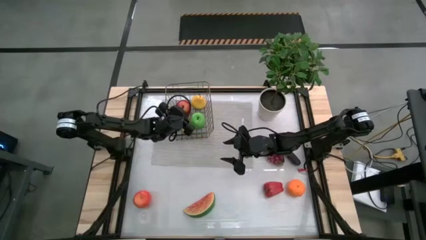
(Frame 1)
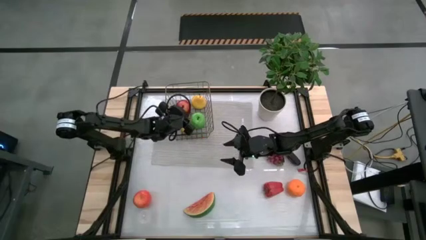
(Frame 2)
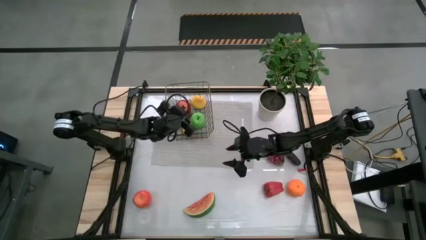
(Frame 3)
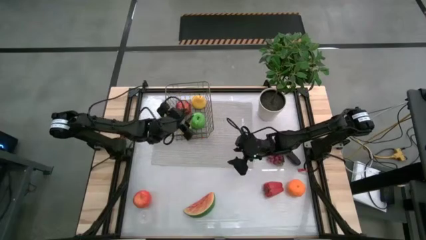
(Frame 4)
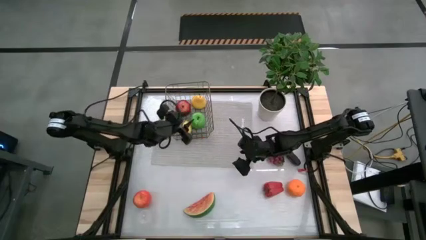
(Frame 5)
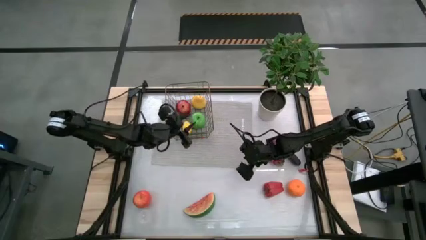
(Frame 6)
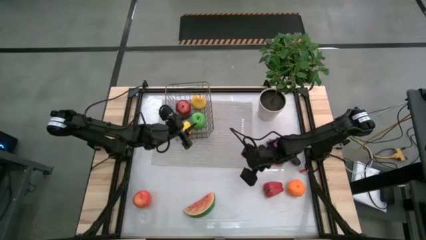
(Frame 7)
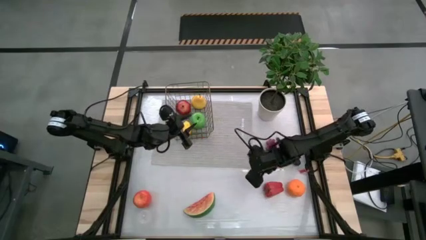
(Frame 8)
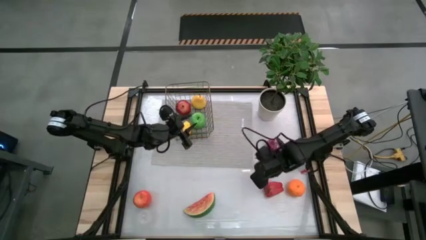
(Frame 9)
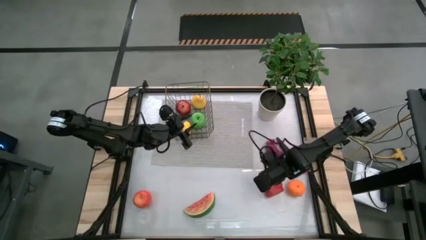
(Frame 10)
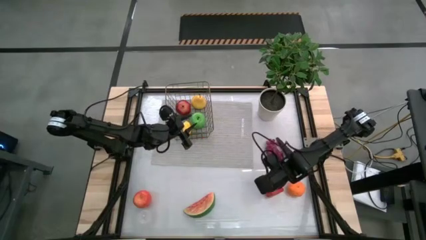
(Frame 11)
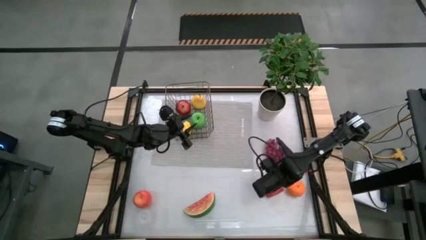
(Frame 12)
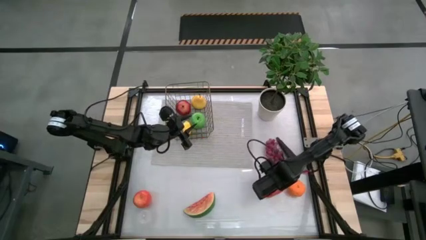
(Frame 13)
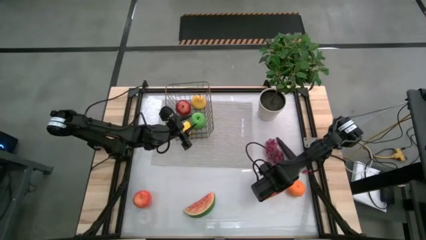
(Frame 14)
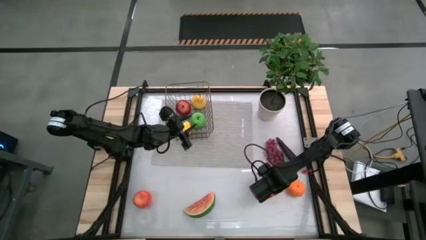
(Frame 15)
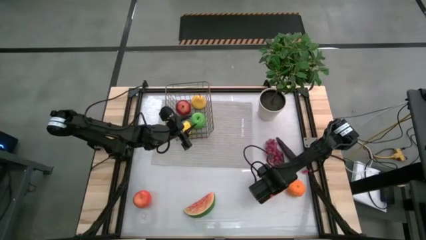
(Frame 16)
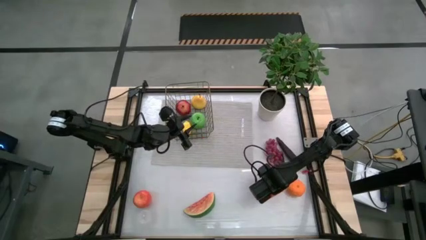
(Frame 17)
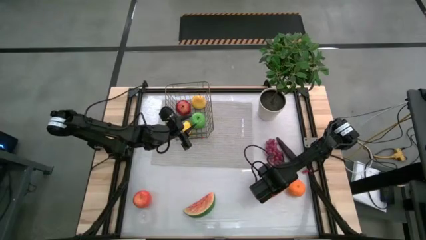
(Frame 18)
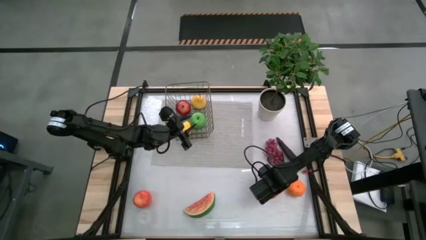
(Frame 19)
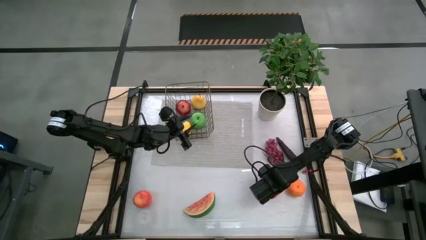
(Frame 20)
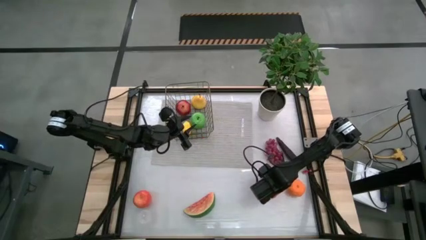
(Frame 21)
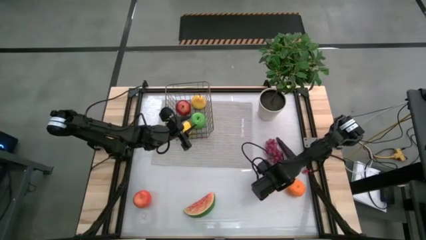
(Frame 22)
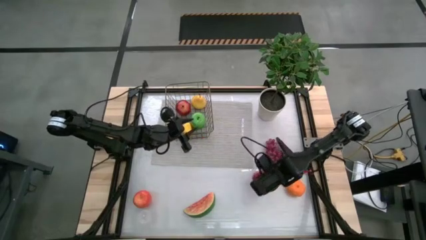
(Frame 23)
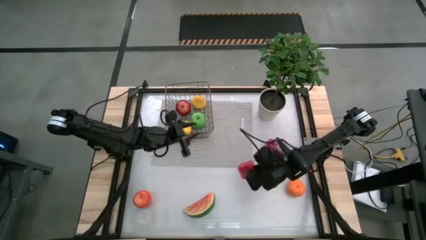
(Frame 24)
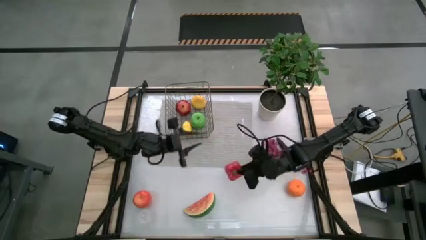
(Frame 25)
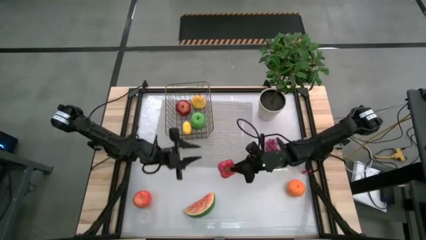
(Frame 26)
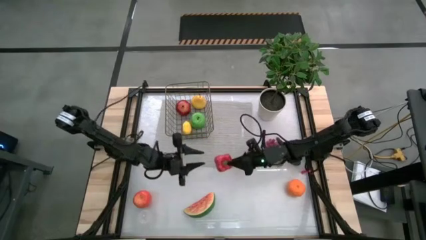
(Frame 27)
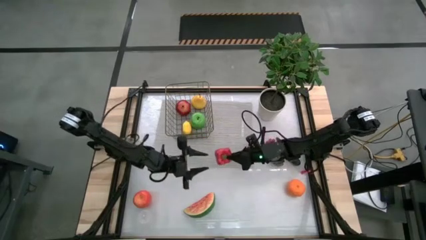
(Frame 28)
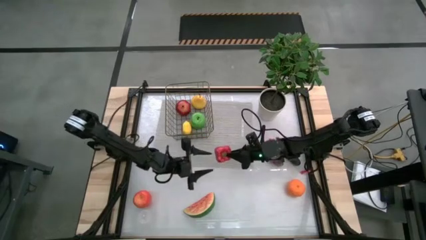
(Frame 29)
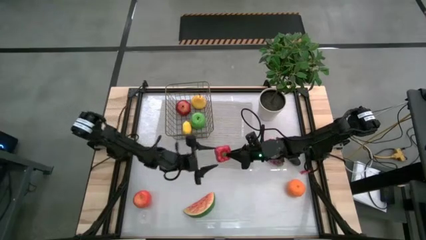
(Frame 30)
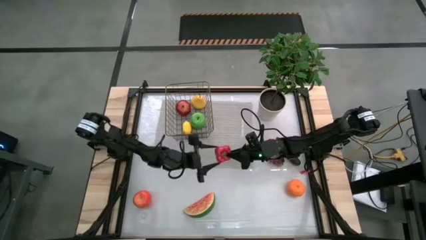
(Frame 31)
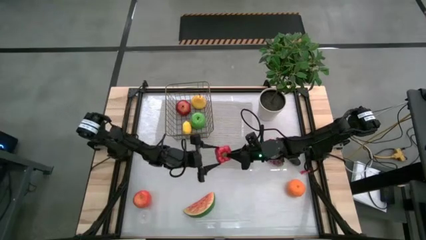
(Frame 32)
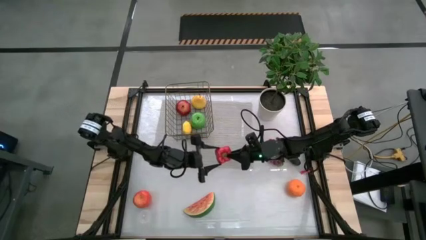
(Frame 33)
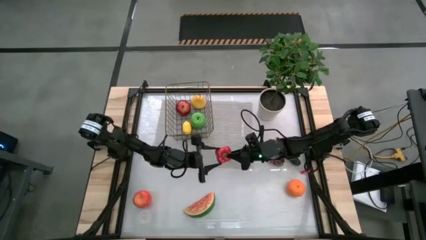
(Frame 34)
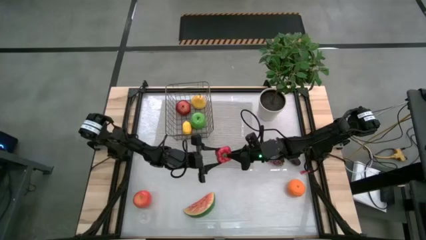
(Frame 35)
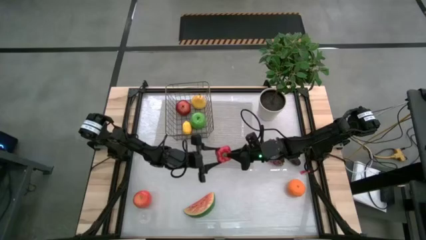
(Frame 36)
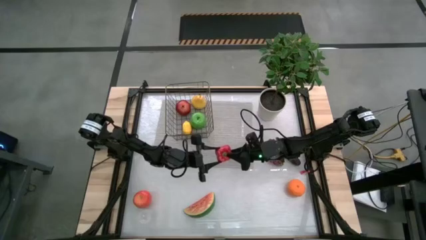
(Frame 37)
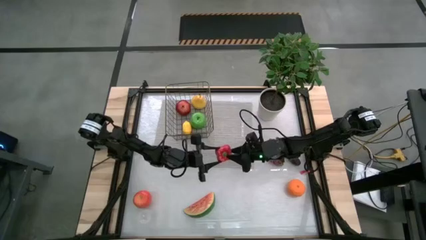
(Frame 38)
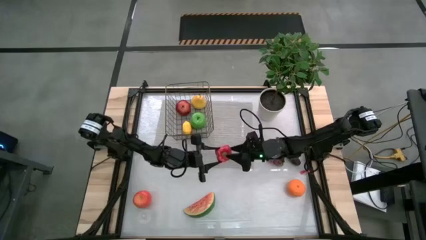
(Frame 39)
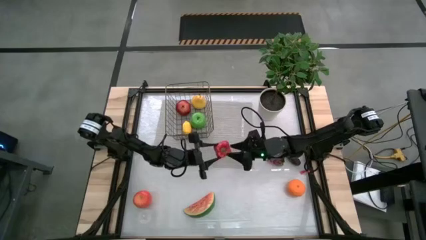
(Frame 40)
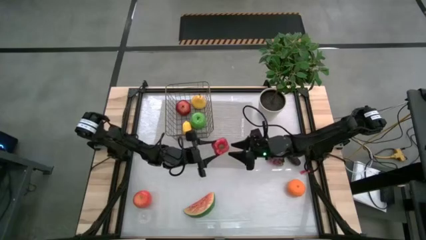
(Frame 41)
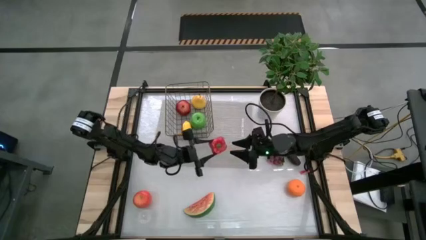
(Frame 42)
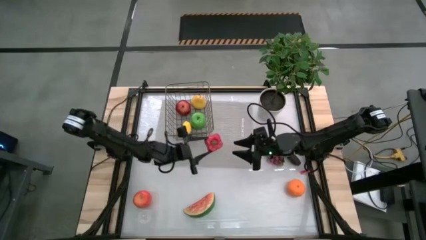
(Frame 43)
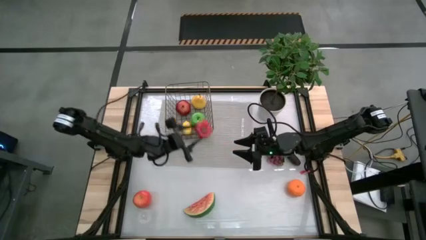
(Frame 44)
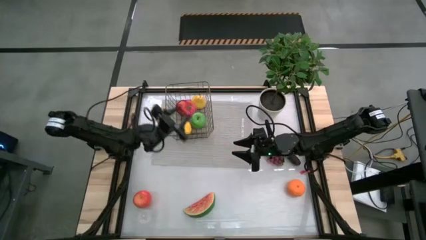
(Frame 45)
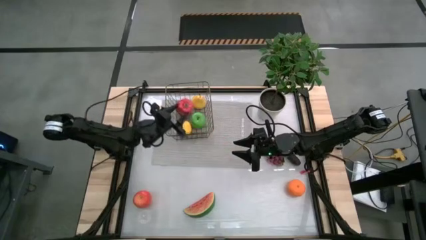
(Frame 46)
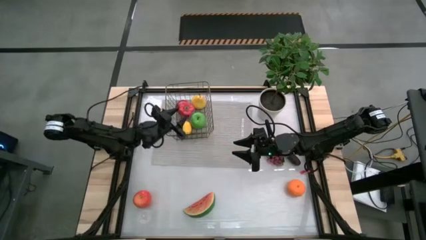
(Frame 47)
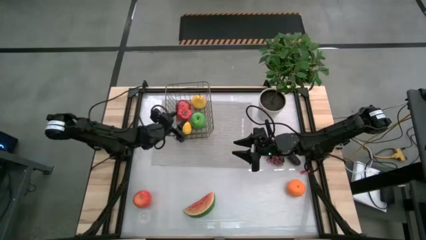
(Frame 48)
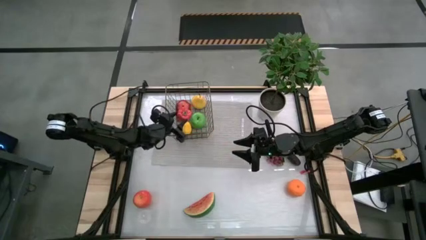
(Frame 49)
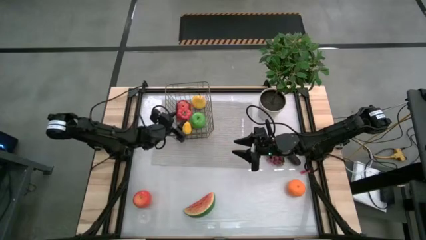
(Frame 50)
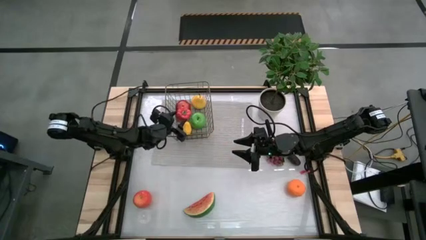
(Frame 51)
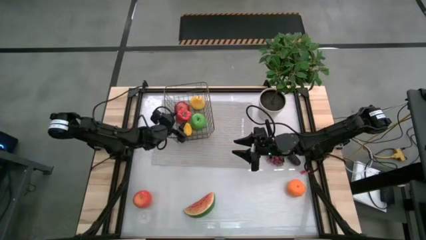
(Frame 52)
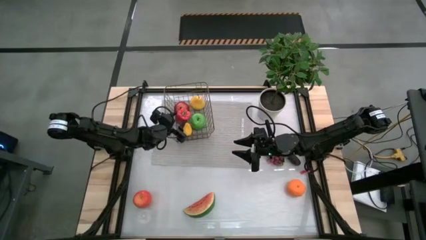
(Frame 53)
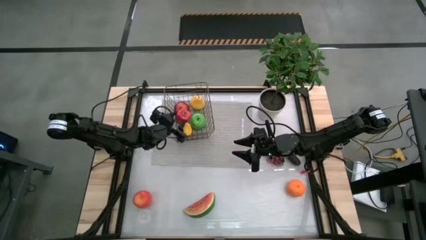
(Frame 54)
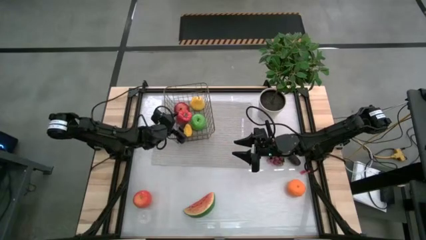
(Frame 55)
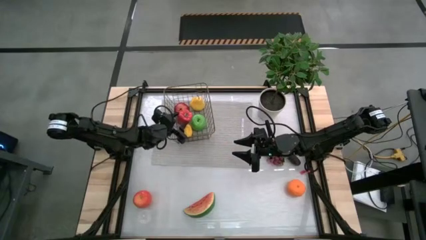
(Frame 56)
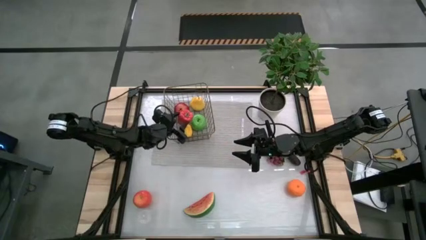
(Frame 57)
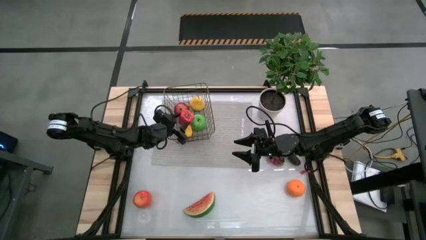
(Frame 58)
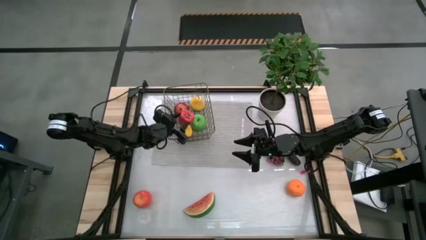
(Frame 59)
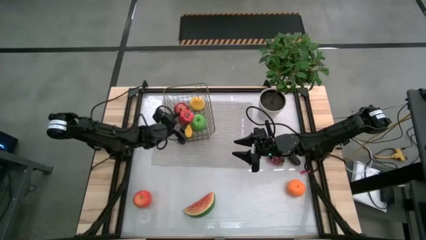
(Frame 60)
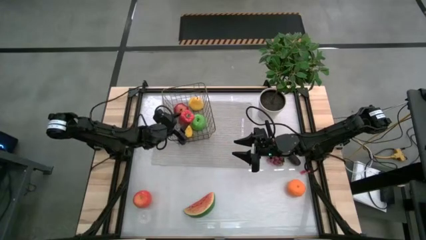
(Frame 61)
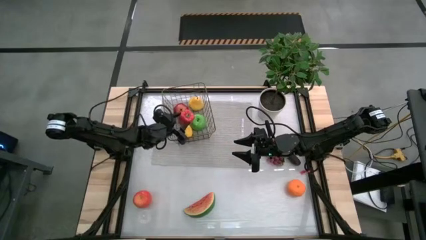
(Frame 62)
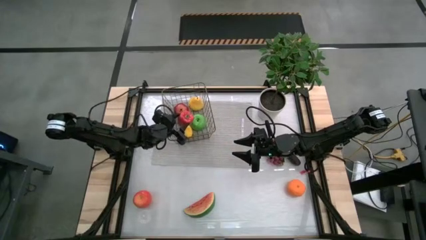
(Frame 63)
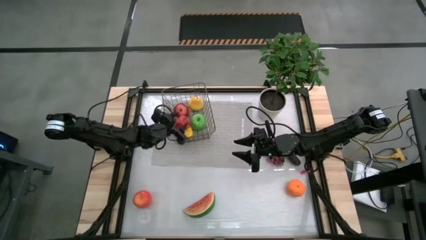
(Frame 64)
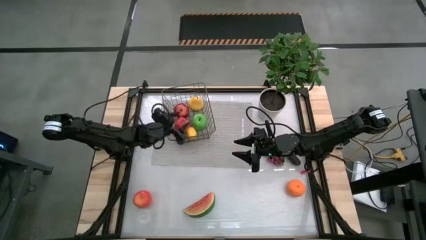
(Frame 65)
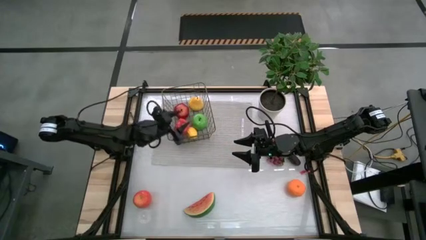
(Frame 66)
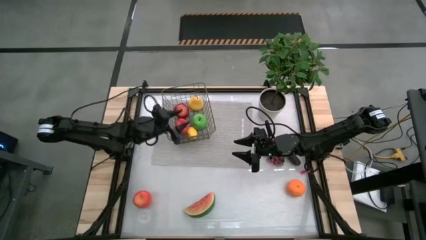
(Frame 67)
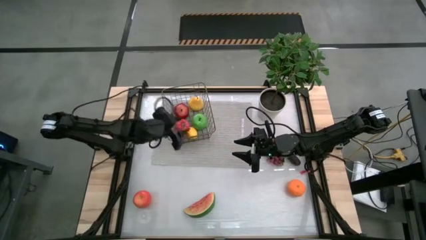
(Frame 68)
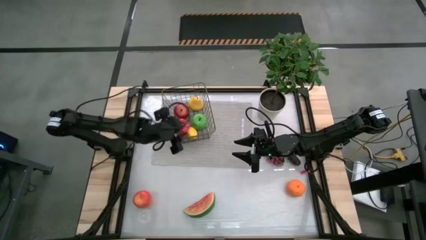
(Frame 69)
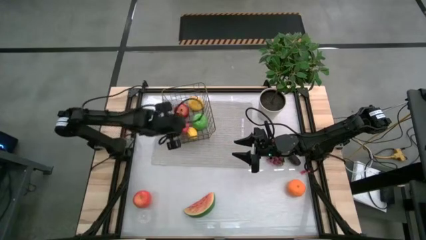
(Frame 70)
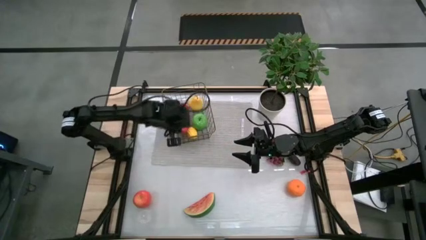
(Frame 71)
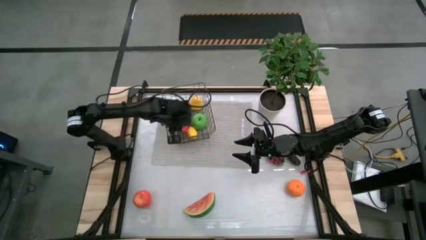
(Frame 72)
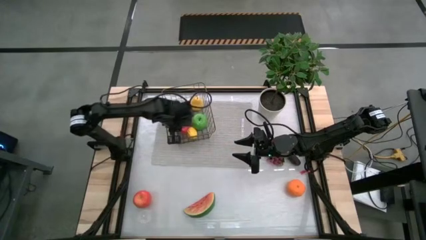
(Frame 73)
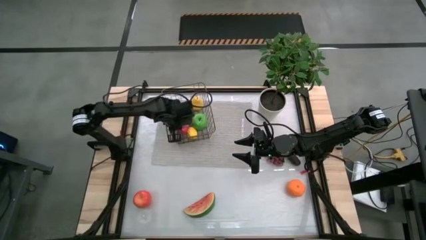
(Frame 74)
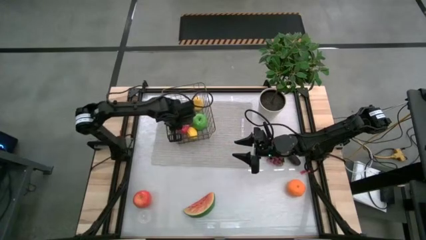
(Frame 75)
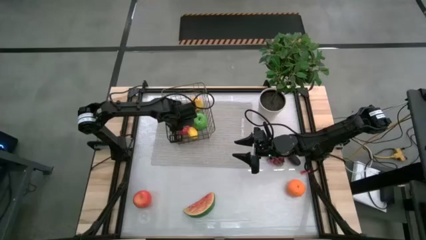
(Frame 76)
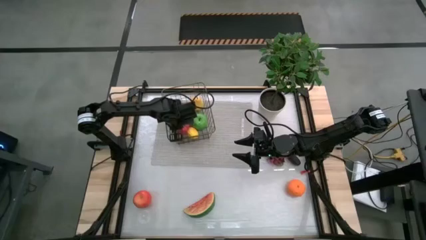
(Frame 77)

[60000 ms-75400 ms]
Task: Build produce basket
Put the red bell pepper into the brown wire basket
